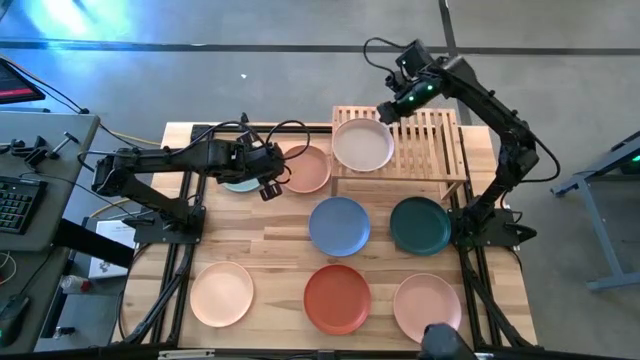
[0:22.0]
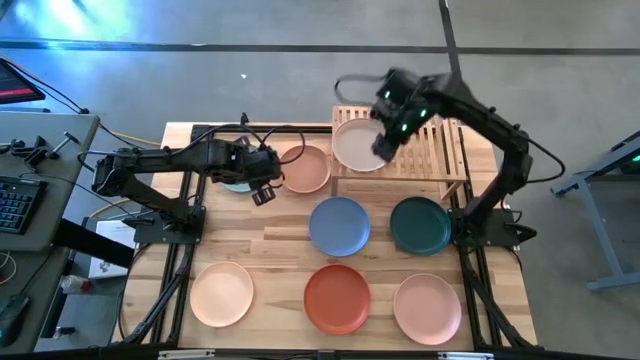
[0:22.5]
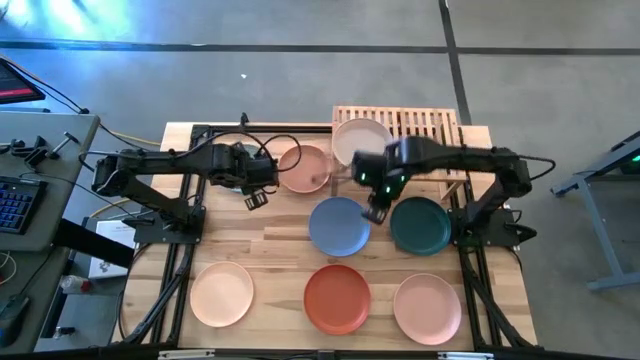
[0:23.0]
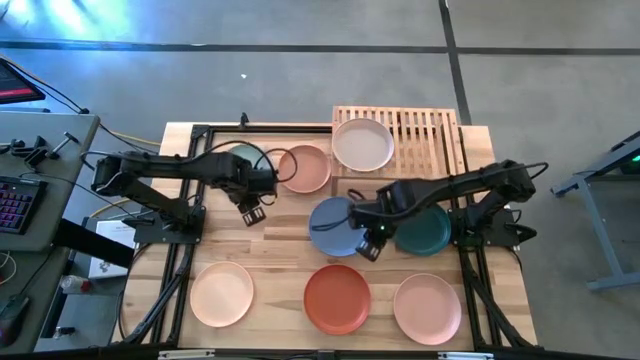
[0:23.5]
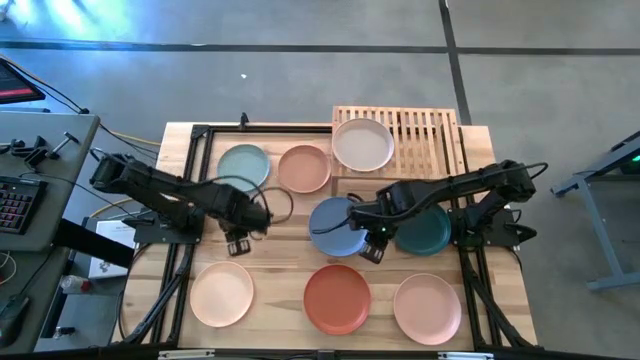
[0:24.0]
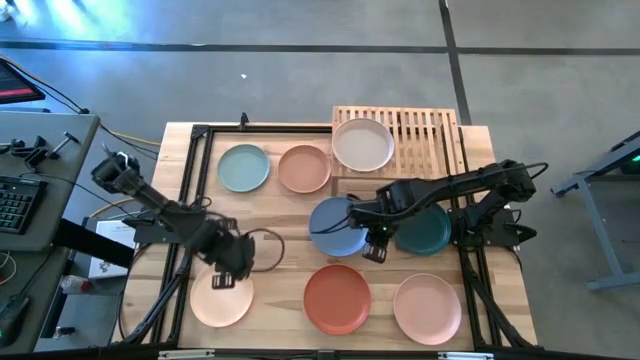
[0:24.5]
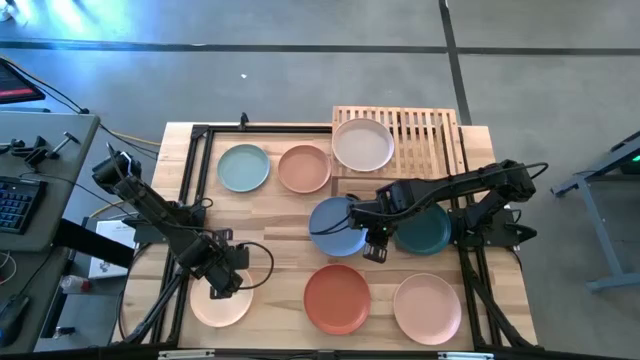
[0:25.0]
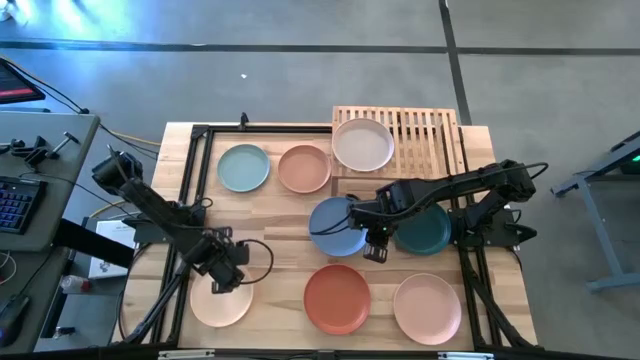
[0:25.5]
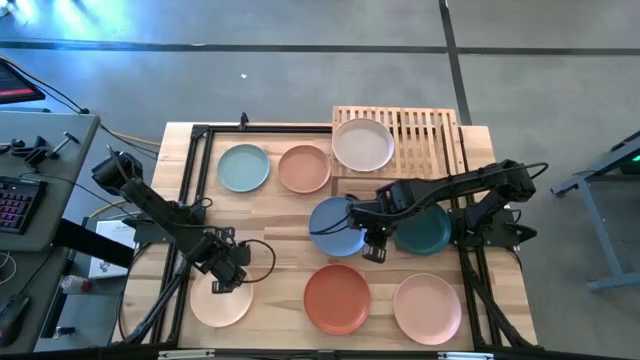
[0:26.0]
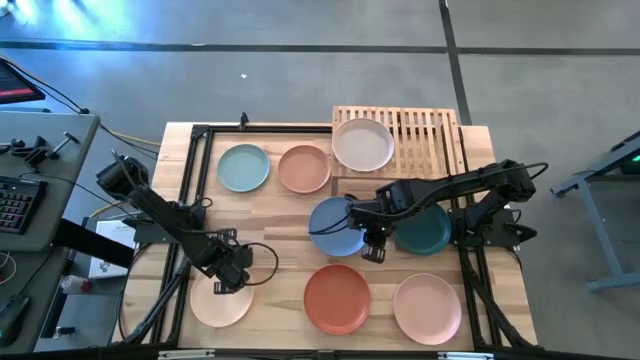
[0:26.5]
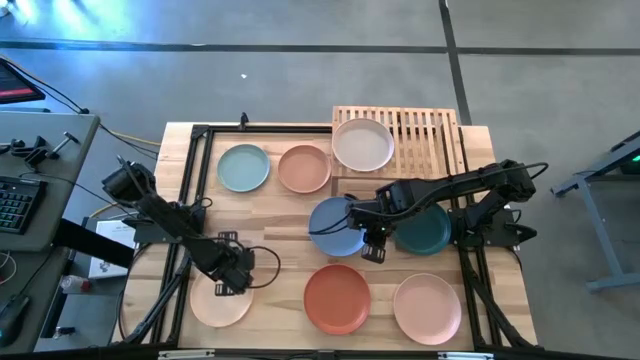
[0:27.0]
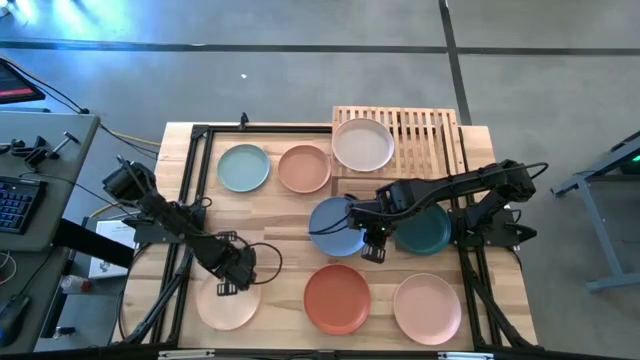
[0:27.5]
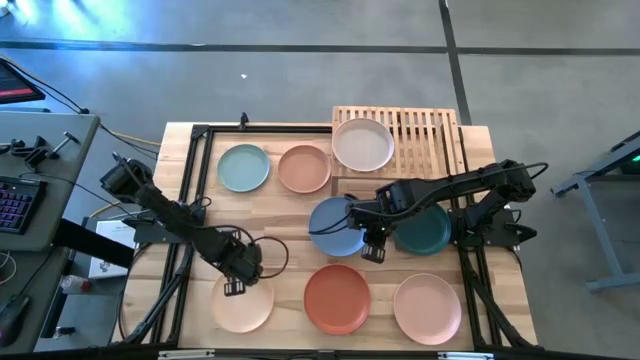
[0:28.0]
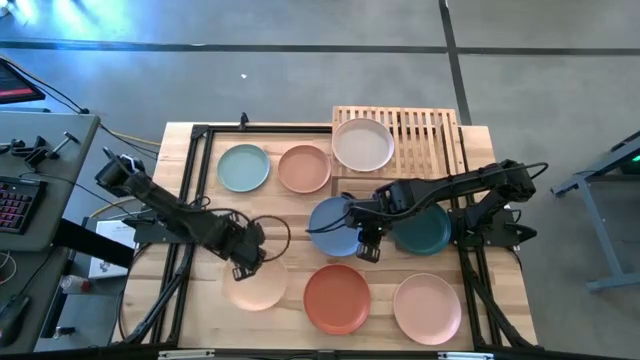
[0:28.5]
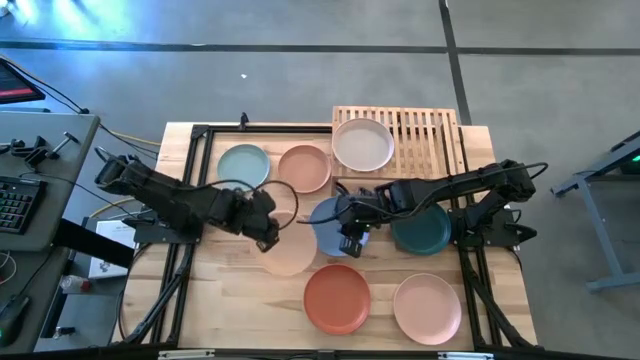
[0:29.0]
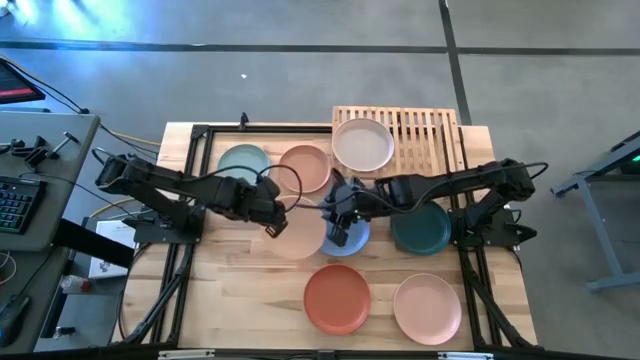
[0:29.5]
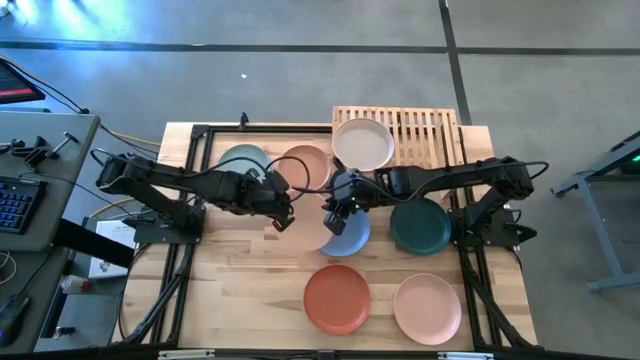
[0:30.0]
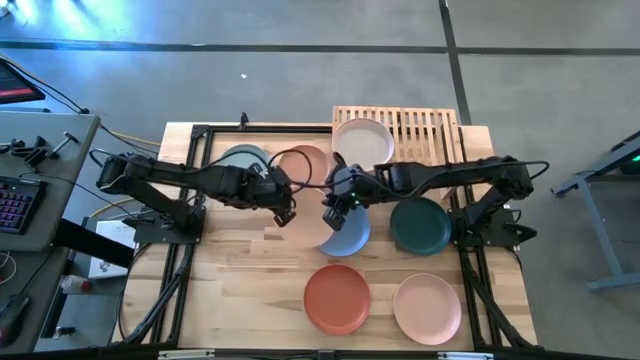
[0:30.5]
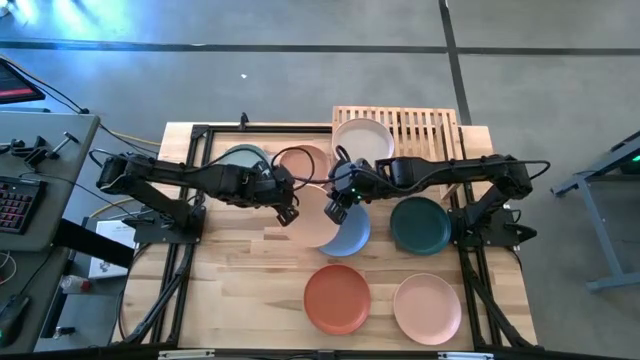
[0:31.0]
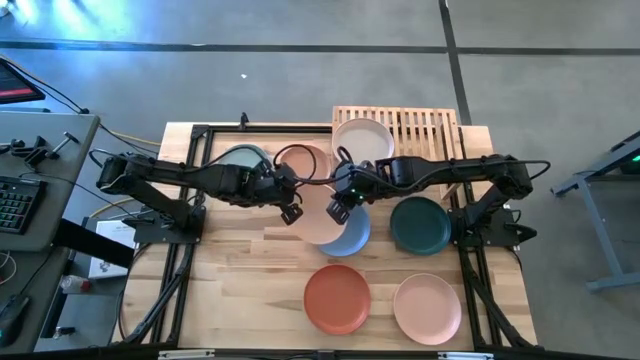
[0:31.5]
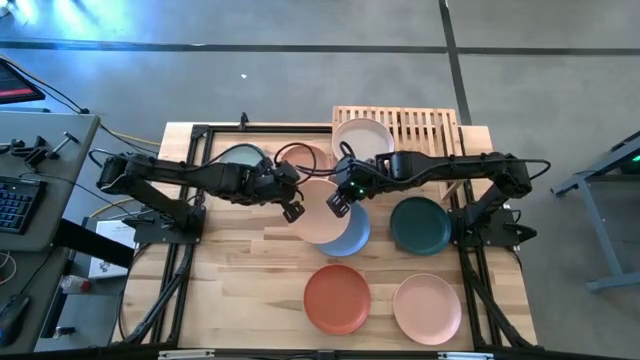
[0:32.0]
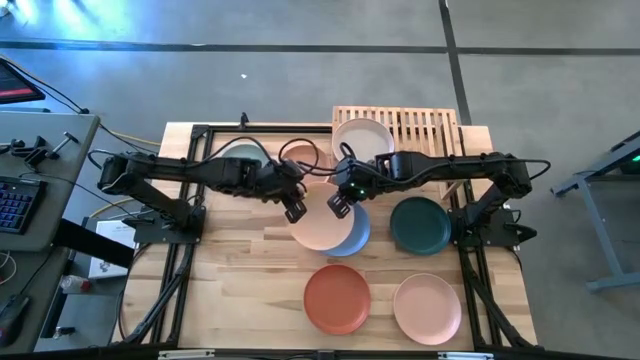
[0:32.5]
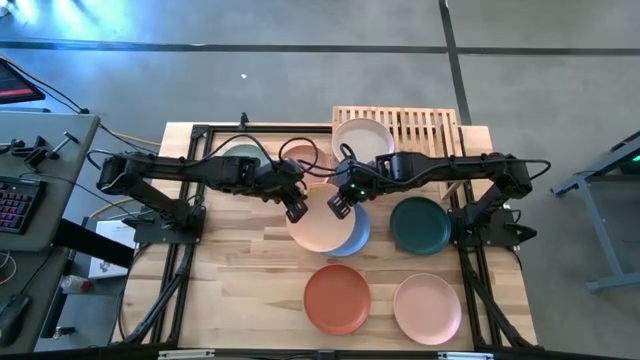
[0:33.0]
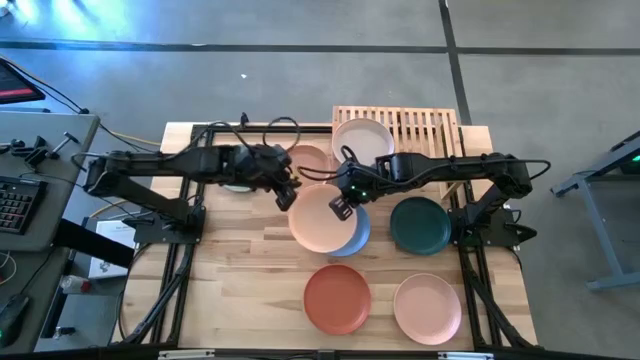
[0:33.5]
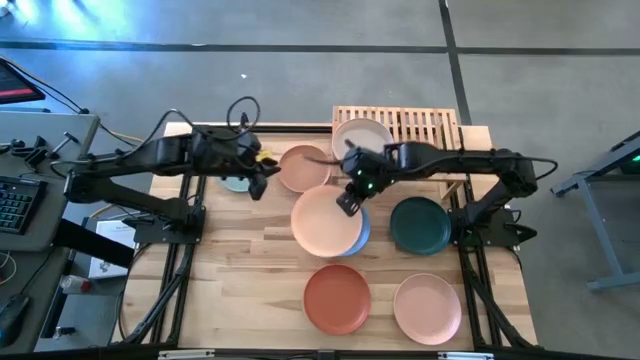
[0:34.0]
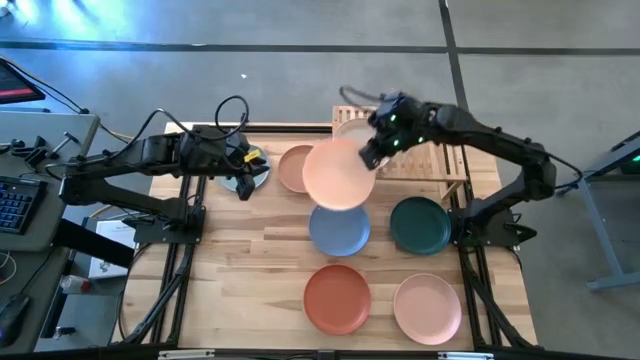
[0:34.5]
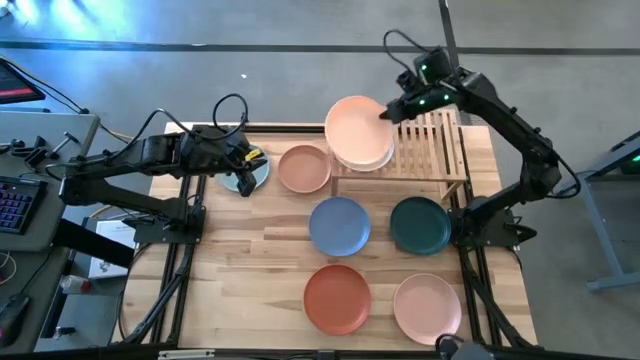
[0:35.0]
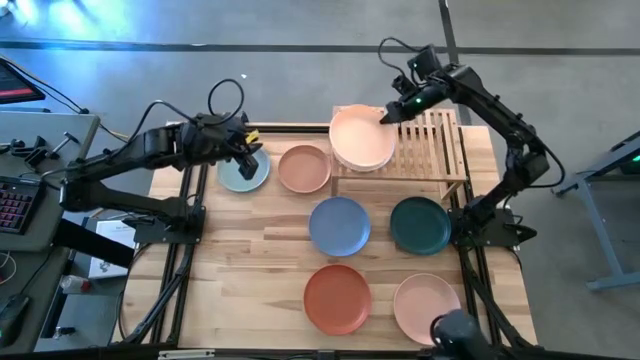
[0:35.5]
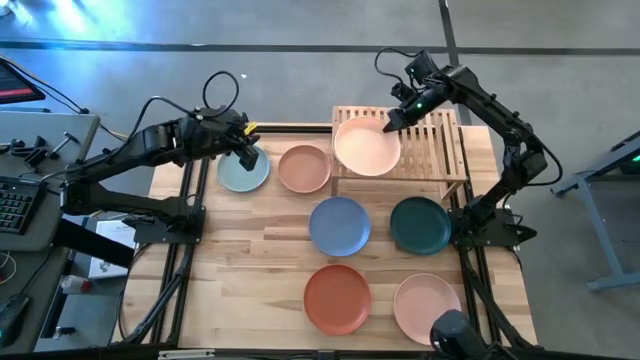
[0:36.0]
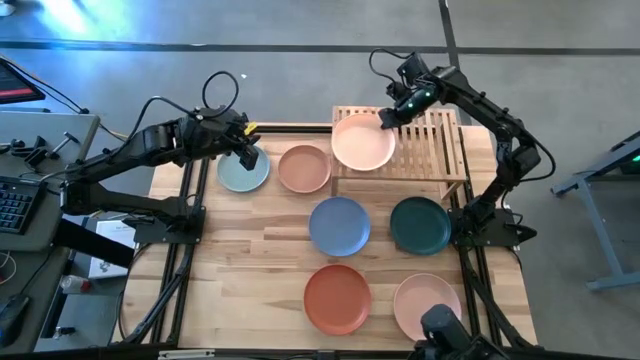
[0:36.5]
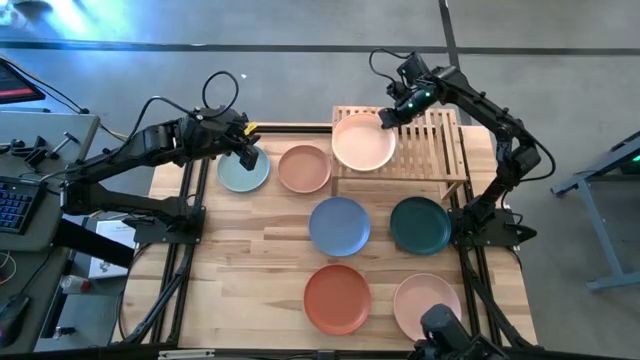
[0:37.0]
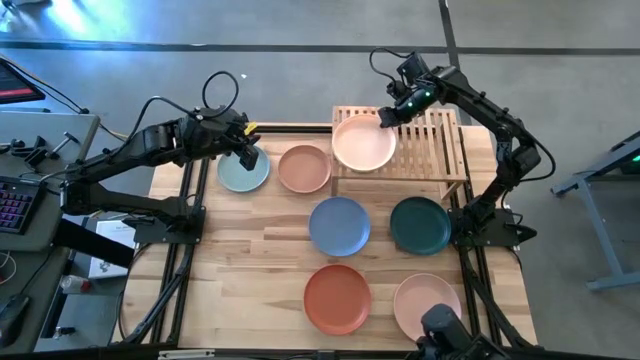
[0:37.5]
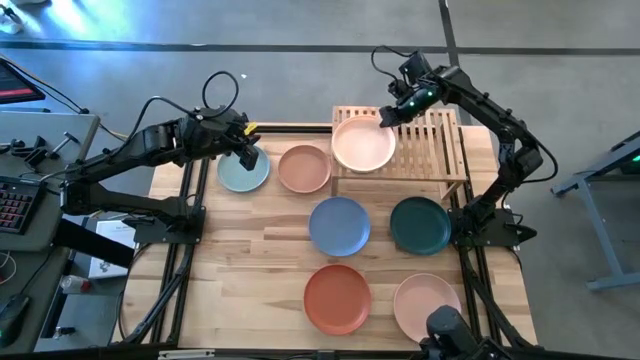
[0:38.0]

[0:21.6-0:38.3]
Task: Place and stack plates onto a shelf
Stack the light orange plate on top of the white plate

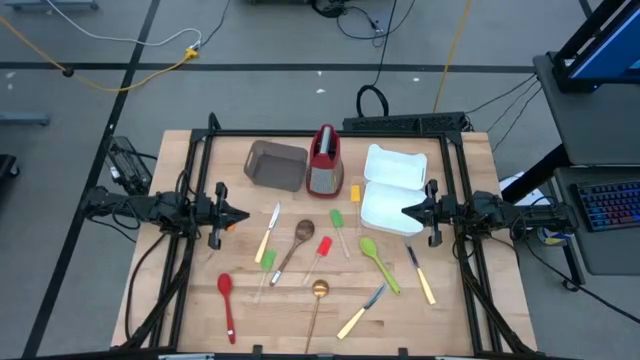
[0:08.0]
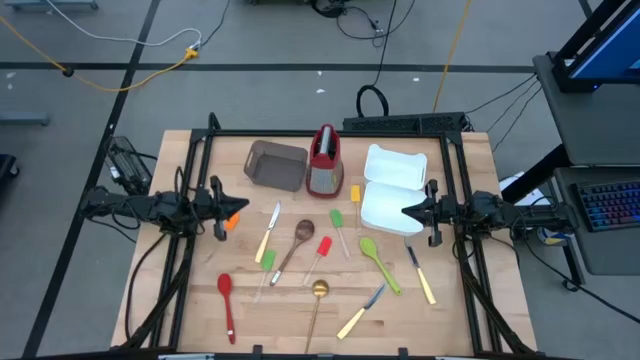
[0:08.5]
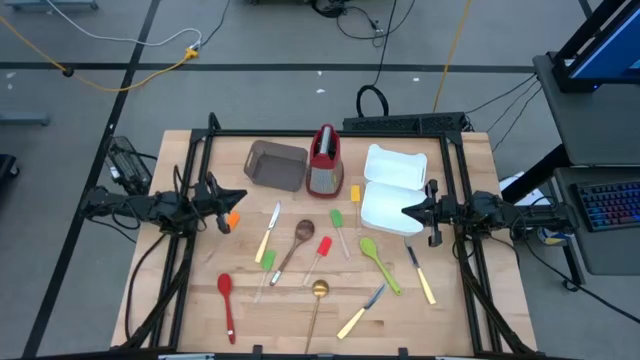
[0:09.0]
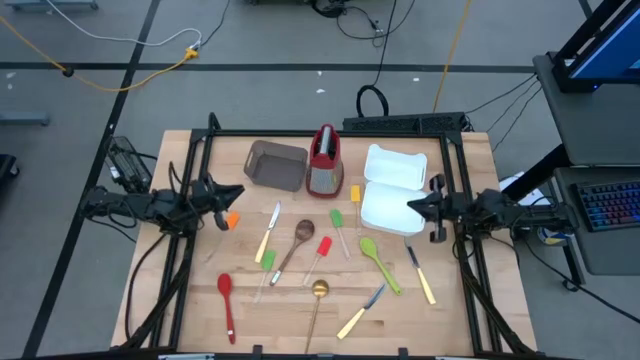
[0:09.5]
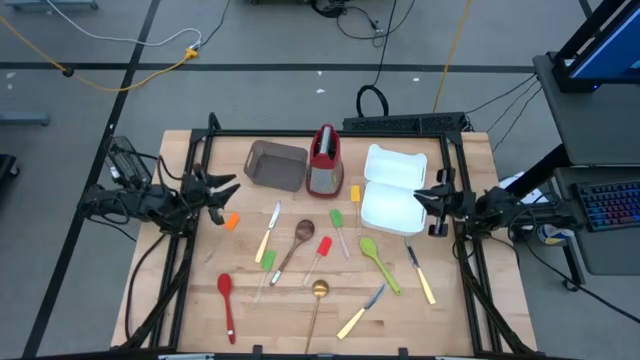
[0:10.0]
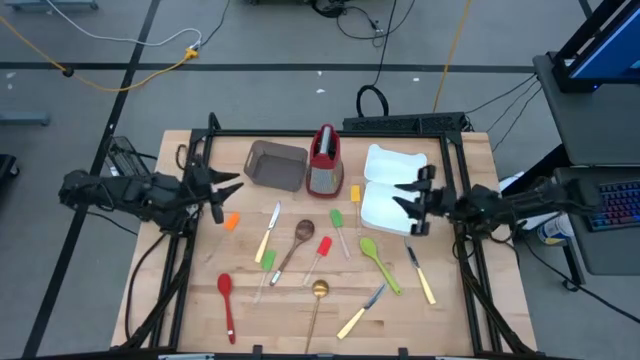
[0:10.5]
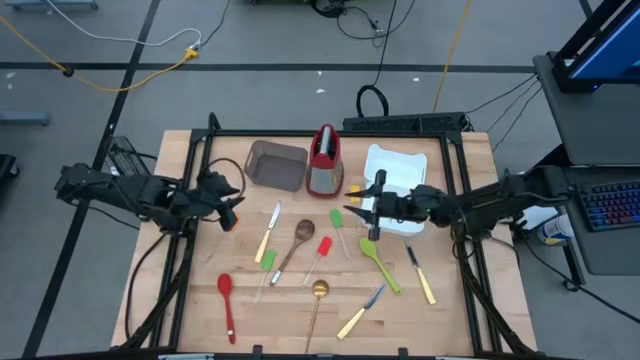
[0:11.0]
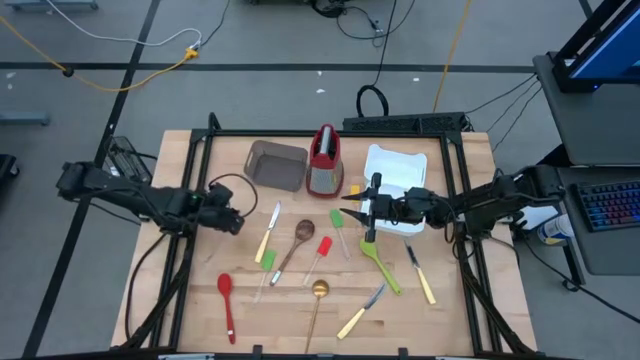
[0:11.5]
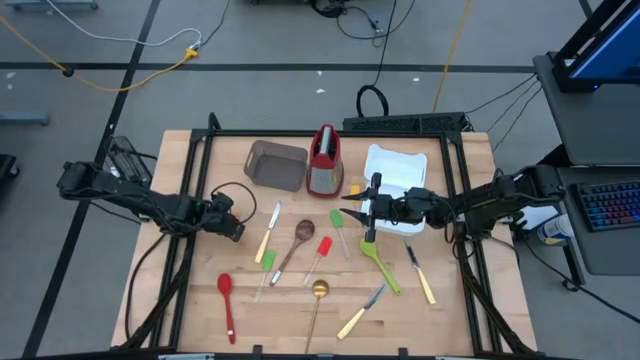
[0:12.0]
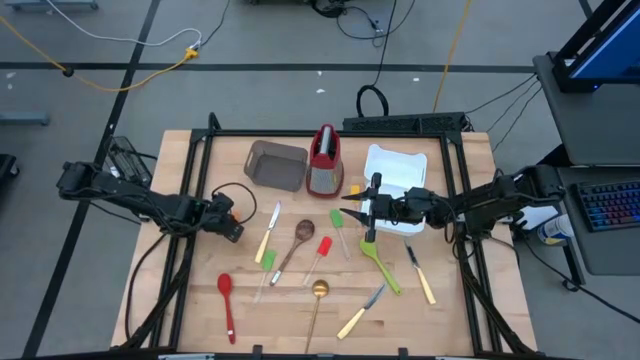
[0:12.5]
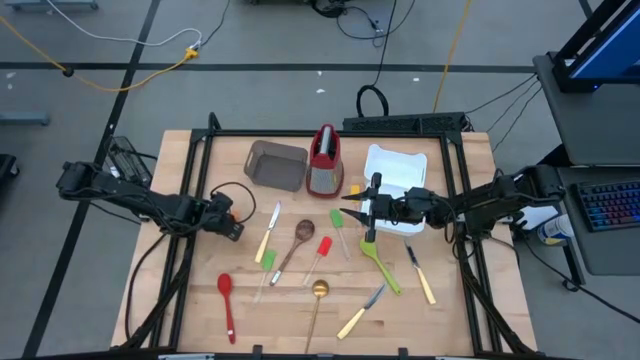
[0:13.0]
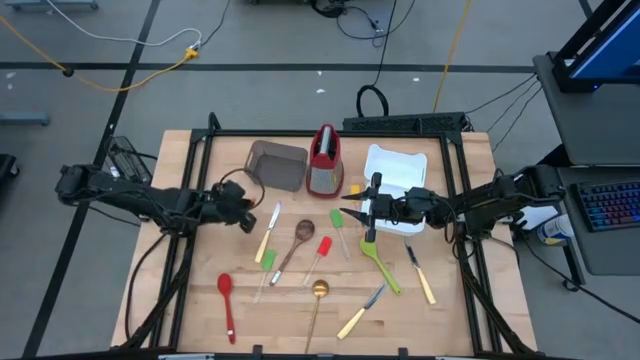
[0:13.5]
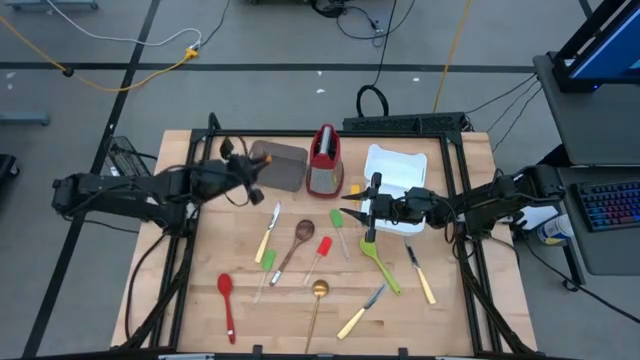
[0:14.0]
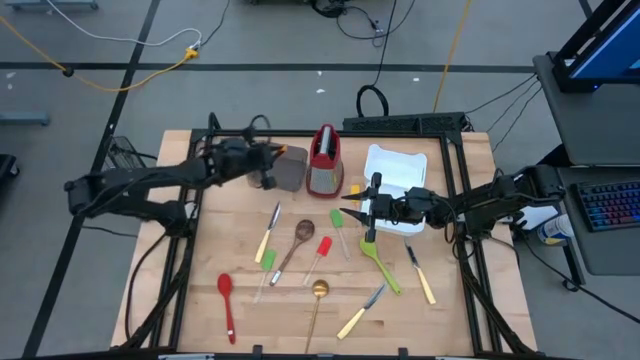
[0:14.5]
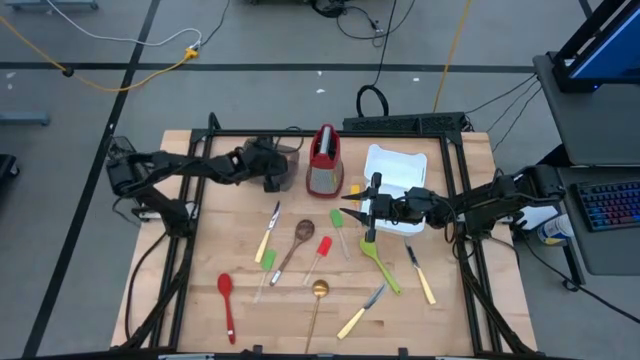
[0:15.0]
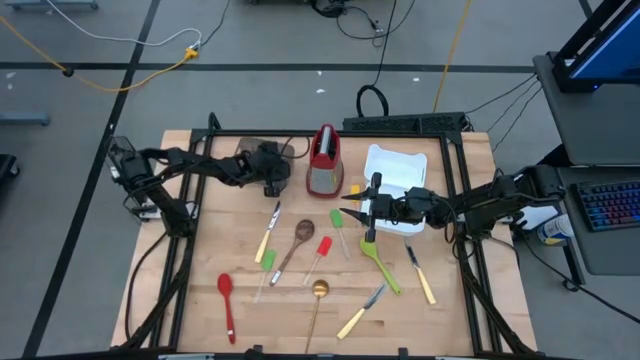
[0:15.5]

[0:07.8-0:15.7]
Task: Pick & Place Kitchen Items
Put the orange spatula into the black bin
